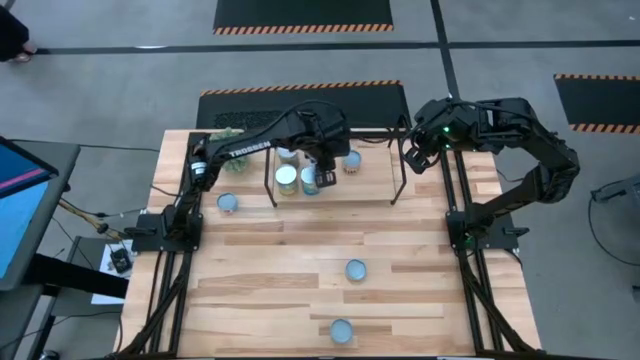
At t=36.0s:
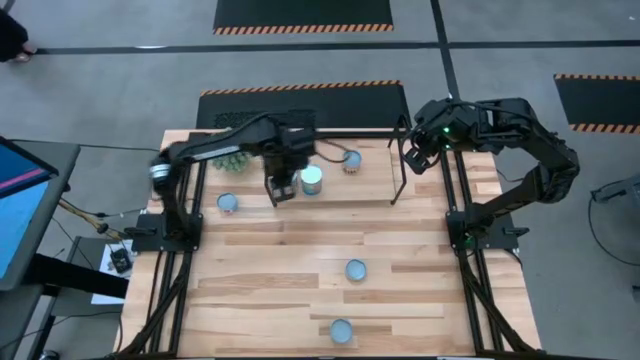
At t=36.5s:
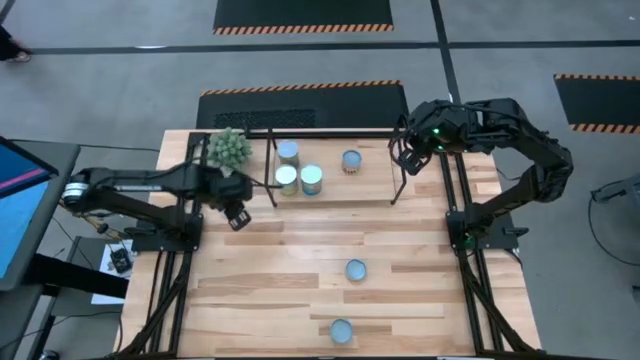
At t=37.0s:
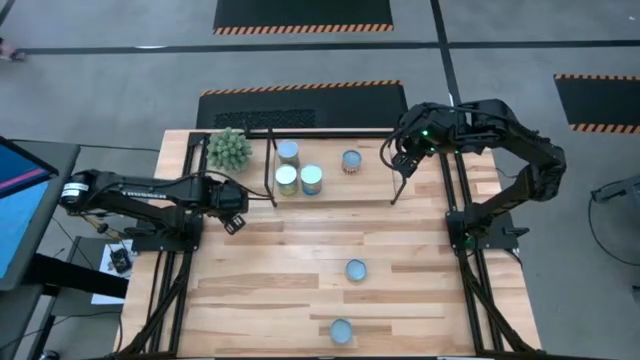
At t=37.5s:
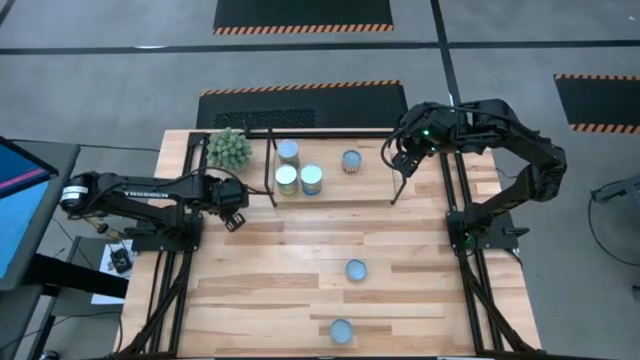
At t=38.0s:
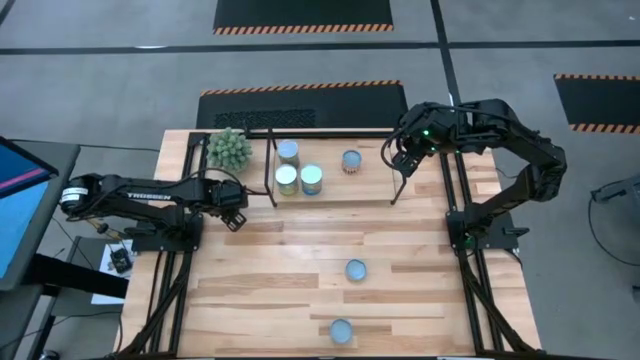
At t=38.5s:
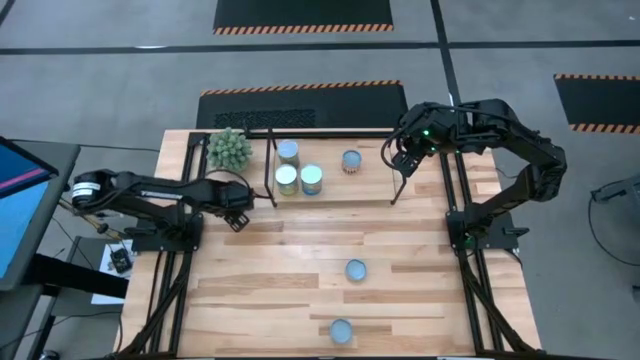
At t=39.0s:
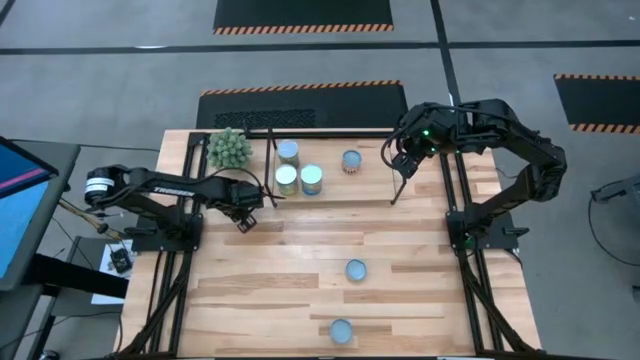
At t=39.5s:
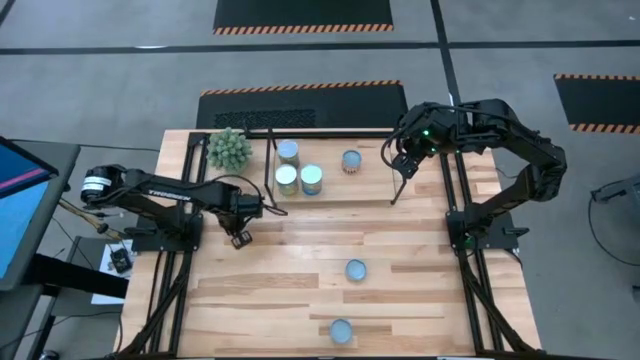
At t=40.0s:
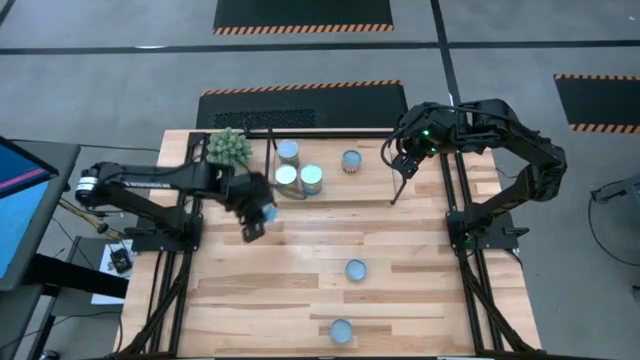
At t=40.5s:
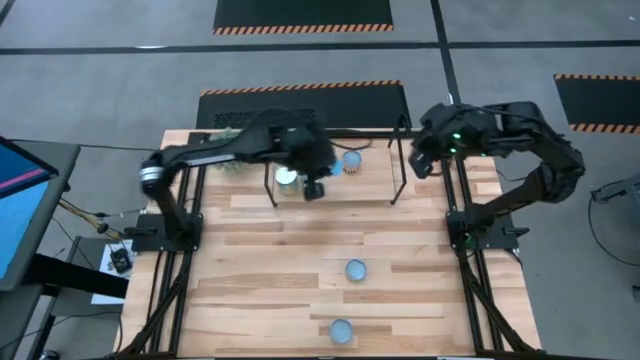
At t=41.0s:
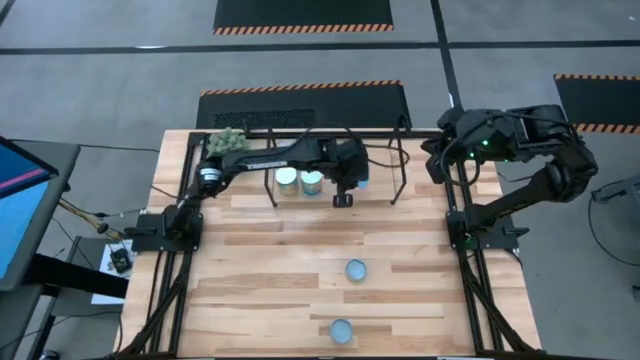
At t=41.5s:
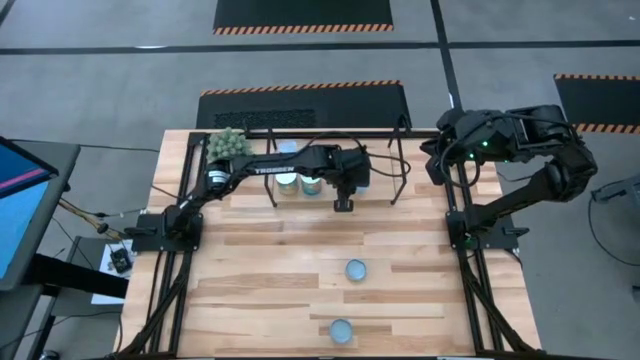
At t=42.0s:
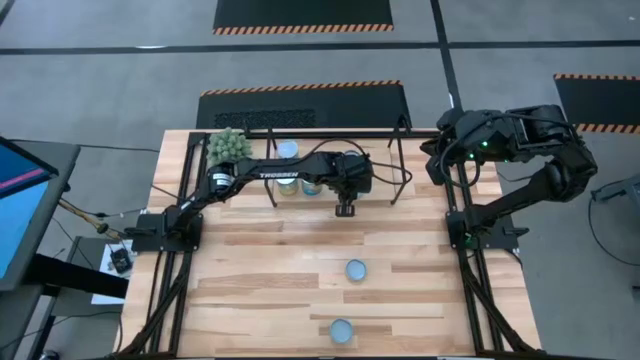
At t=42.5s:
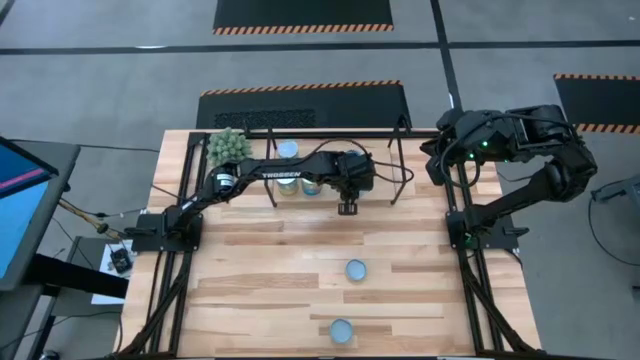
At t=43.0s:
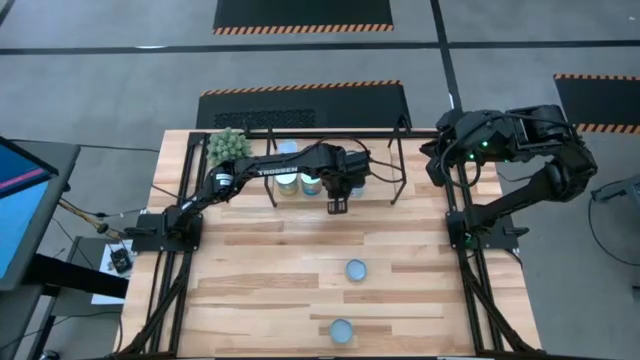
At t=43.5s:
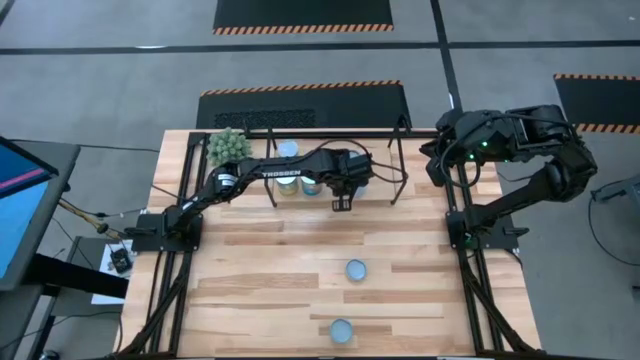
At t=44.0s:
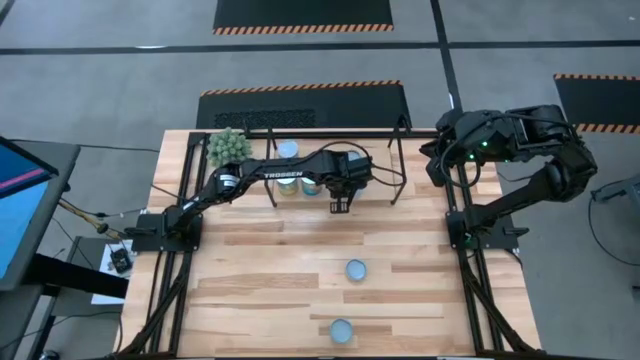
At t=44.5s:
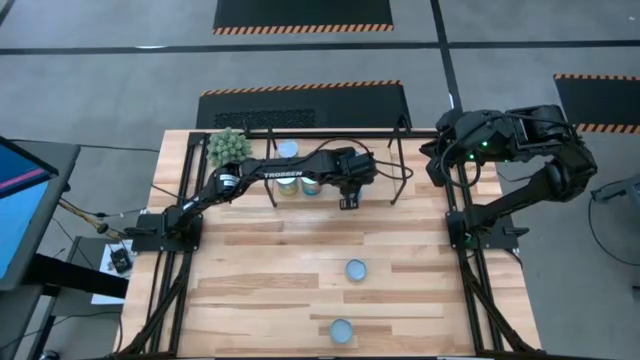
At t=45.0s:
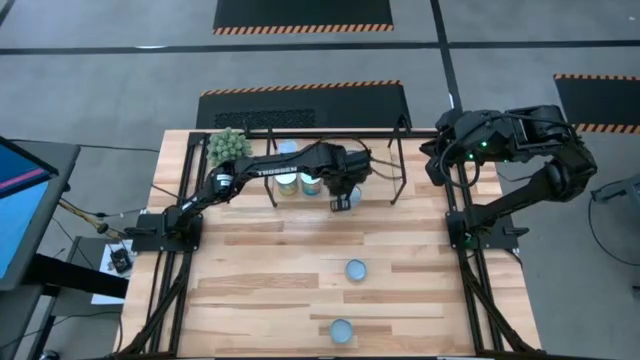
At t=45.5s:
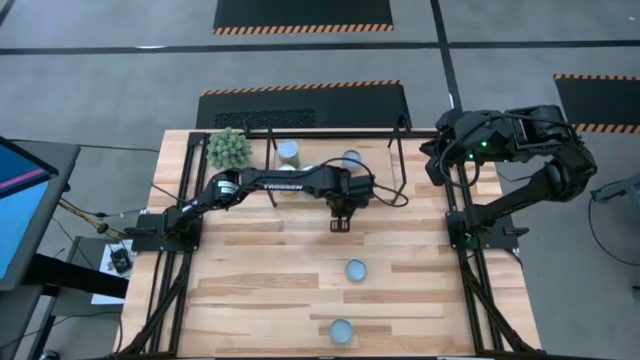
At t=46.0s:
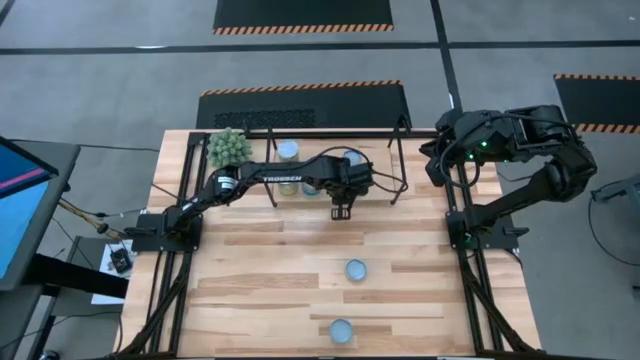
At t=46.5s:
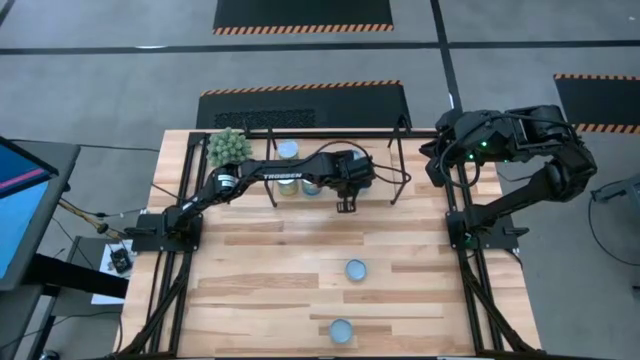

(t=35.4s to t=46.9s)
Task: Pick and place cans onto a shelf
Put the canned tuna on the shelf

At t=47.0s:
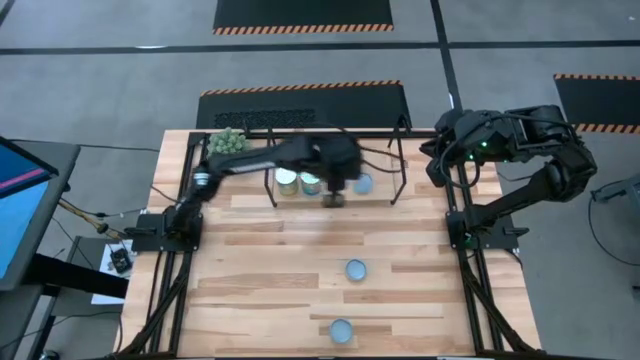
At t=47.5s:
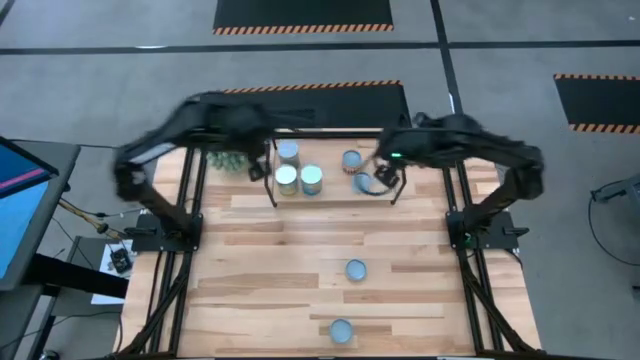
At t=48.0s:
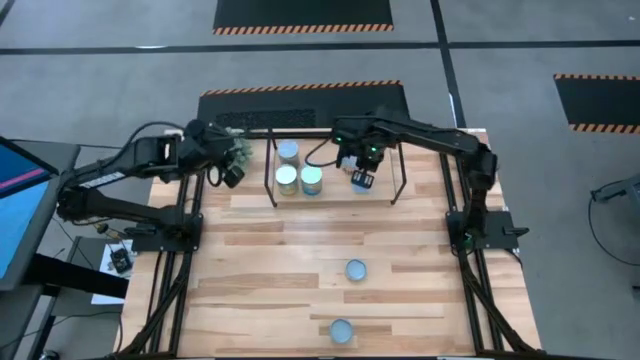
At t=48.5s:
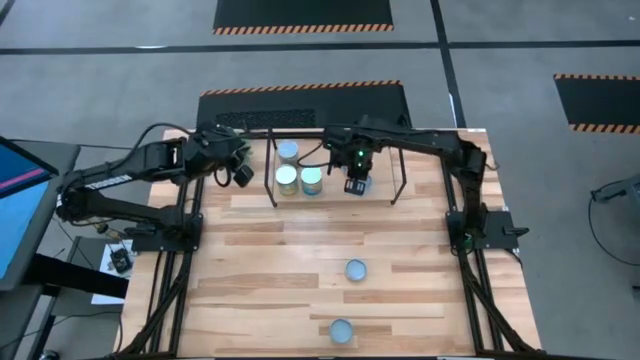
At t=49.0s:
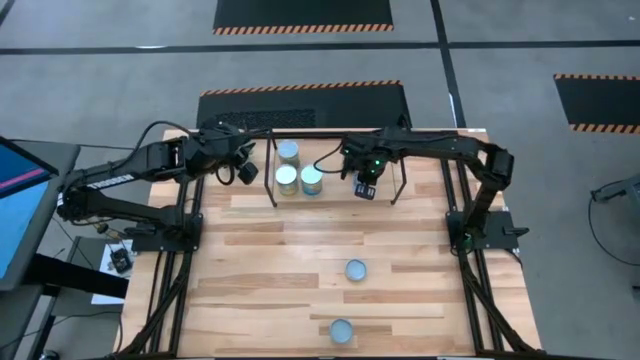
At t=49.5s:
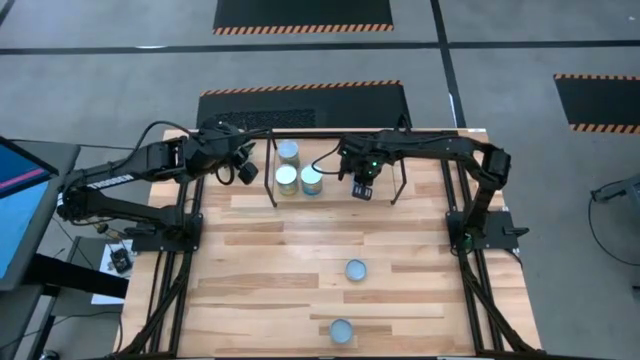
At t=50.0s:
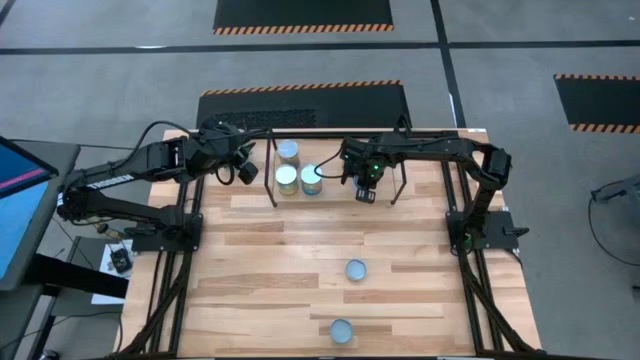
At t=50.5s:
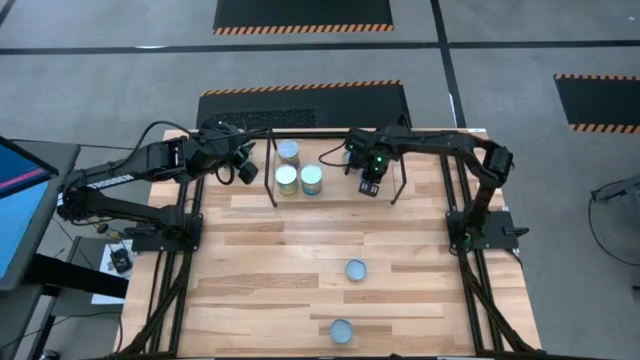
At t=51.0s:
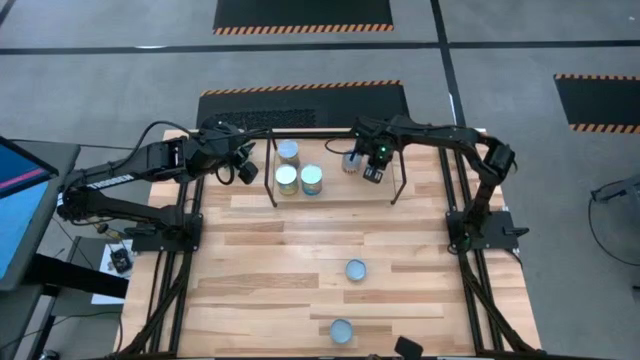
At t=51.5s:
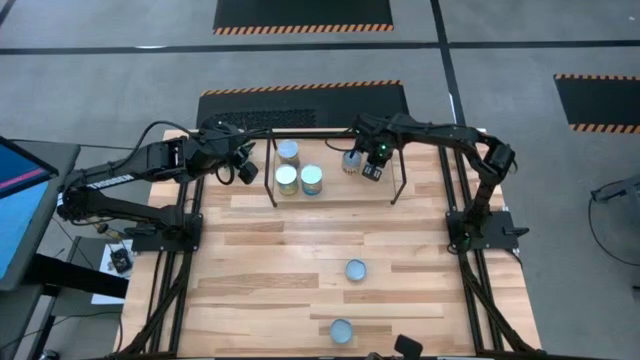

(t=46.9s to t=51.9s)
Adjust the canned tuna on the shelf

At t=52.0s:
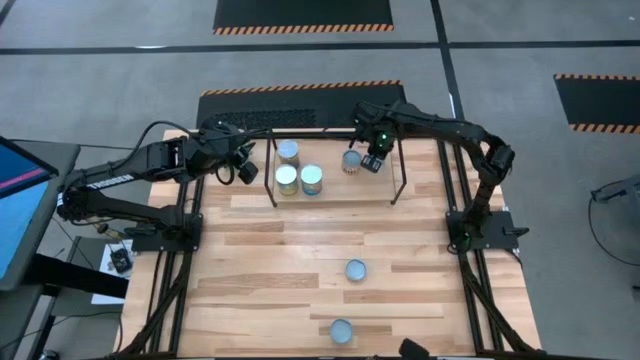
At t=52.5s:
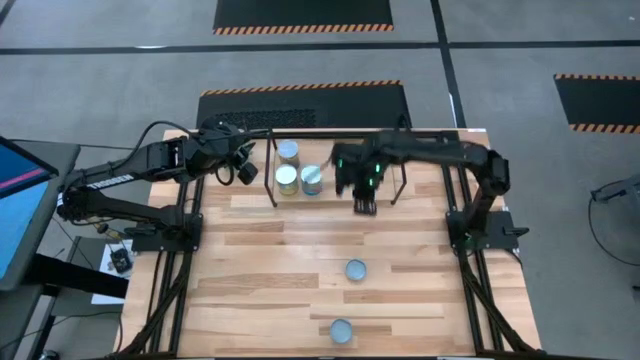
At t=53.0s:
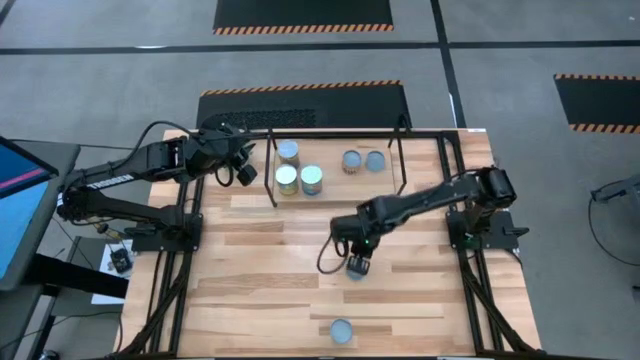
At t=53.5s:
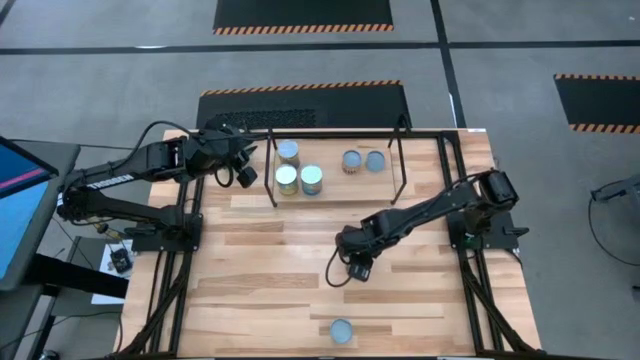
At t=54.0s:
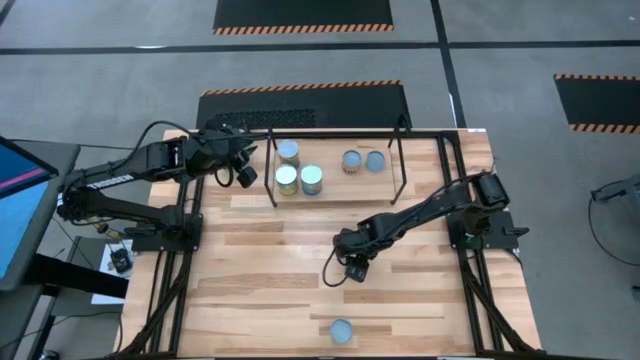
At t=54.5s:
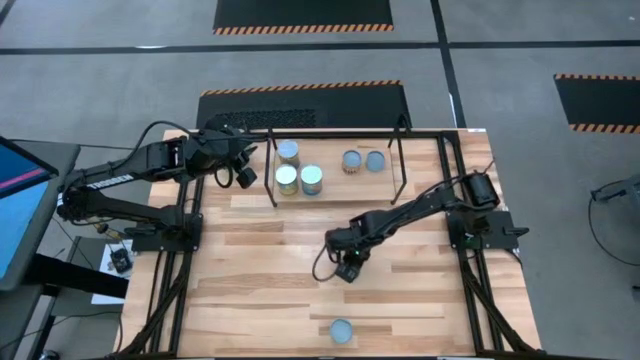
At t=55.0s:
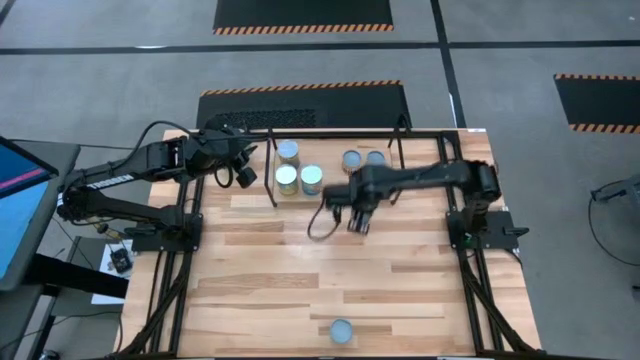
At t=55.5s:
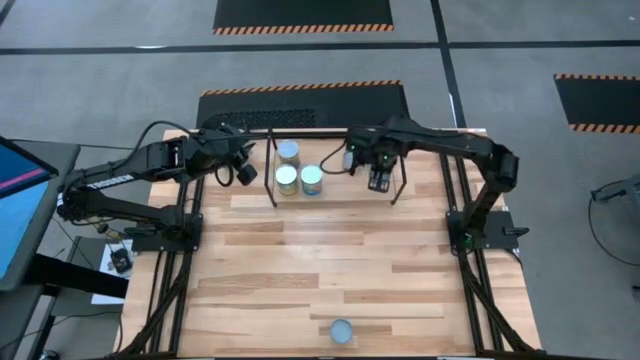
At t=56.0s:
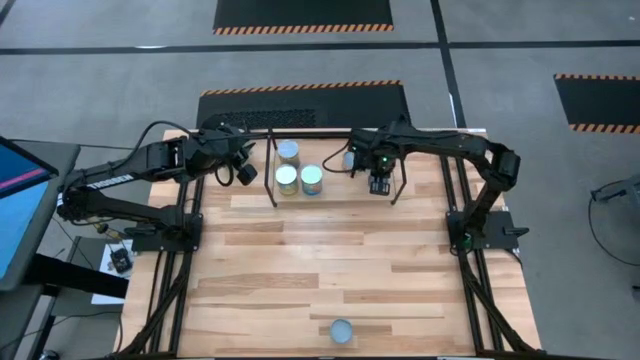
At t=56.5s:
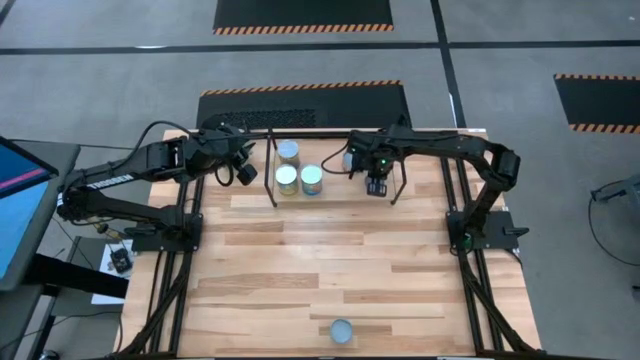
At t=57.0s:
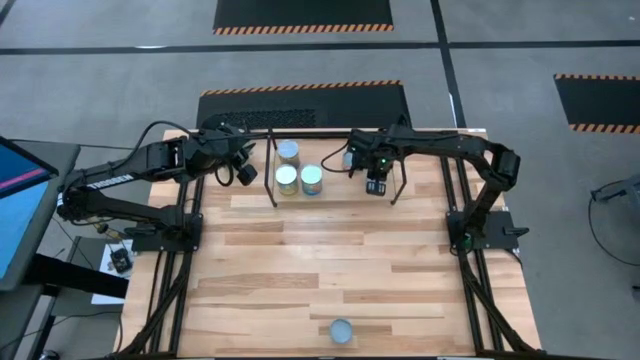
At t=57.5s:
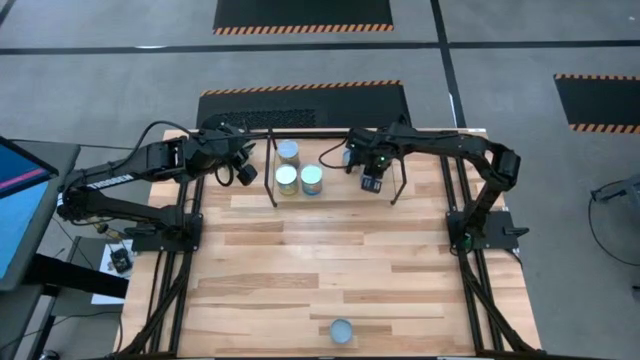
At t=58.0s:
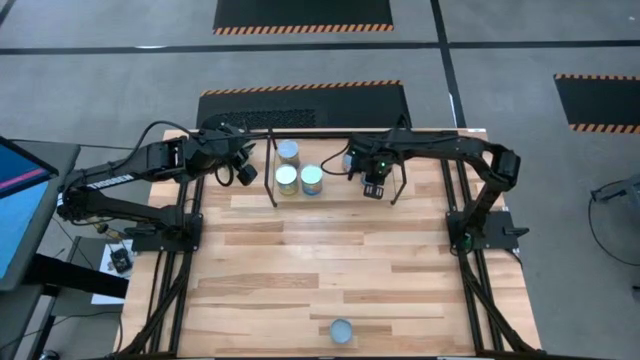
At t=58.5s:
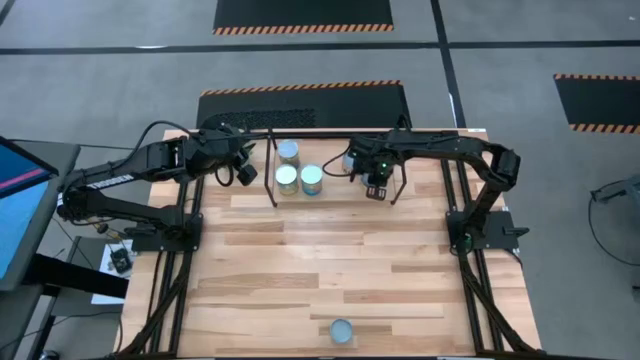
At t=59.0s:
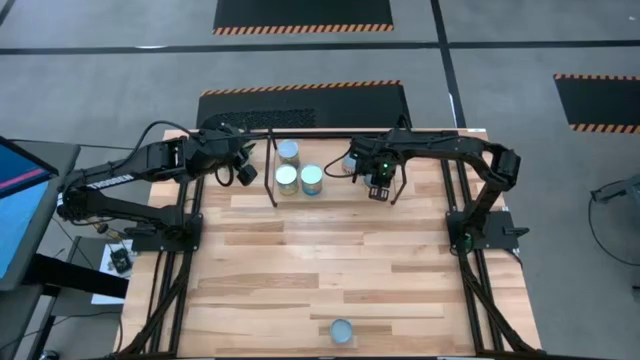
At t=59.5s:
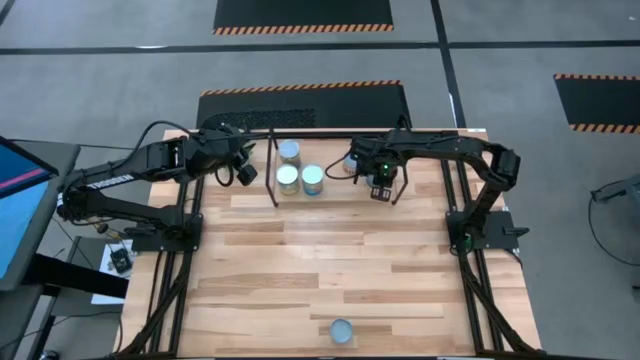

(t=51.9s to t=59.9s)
Put the canned meatballs on the shelf
